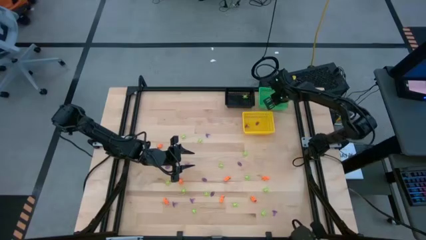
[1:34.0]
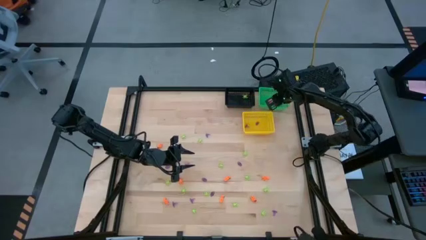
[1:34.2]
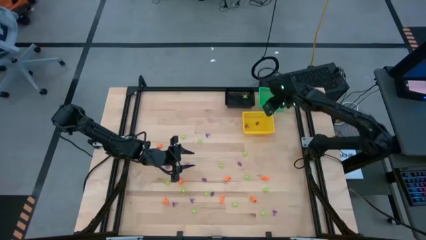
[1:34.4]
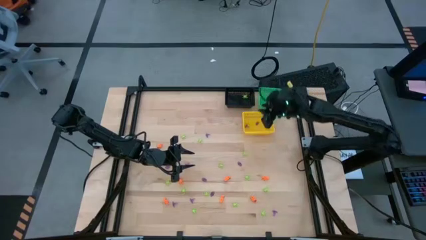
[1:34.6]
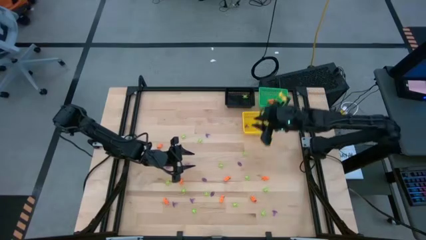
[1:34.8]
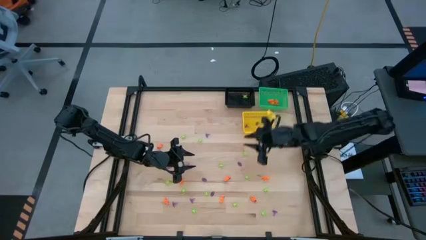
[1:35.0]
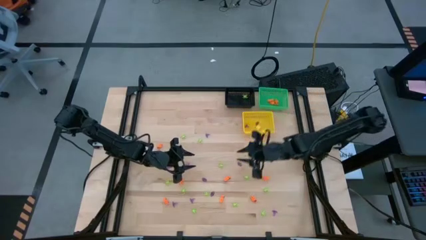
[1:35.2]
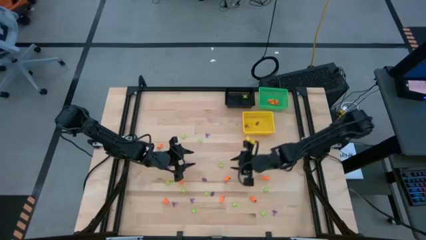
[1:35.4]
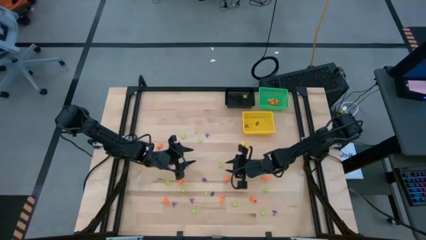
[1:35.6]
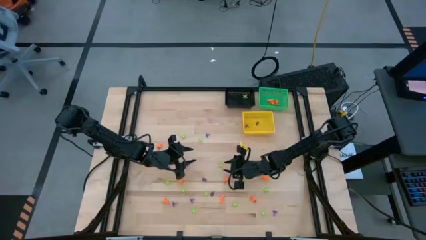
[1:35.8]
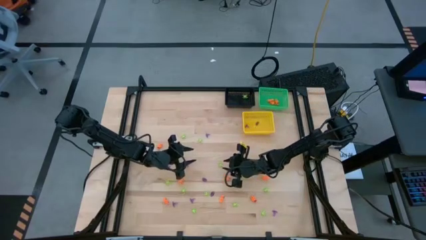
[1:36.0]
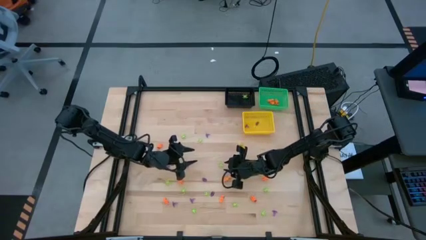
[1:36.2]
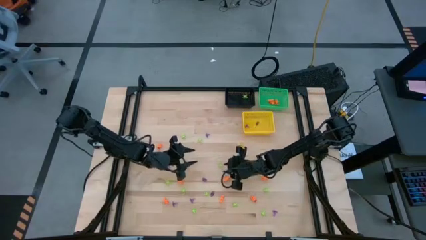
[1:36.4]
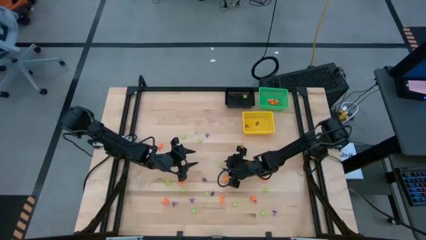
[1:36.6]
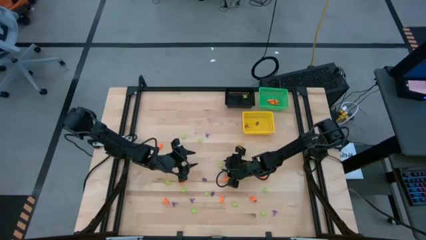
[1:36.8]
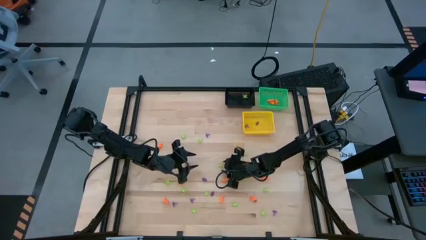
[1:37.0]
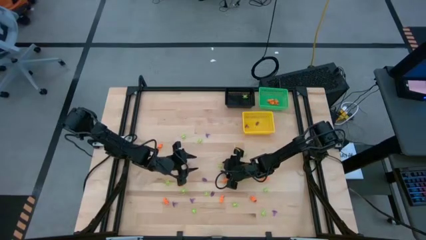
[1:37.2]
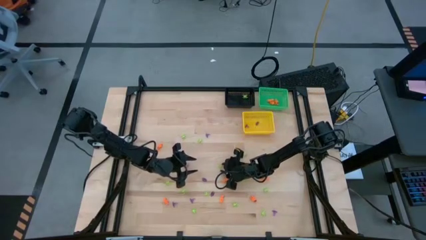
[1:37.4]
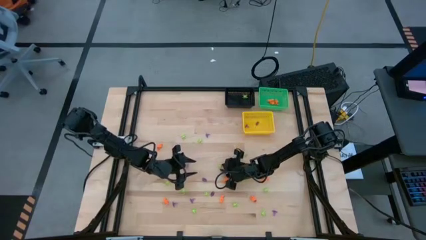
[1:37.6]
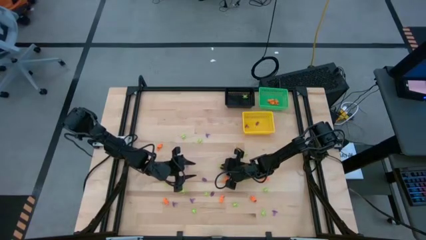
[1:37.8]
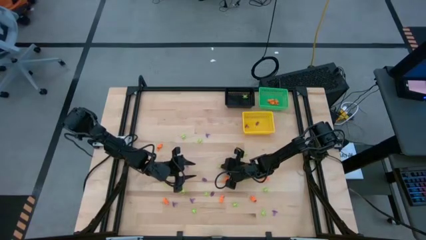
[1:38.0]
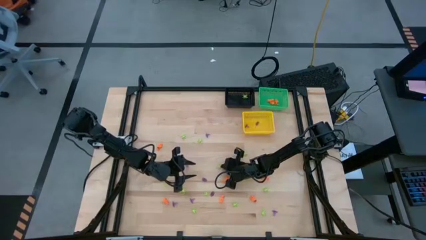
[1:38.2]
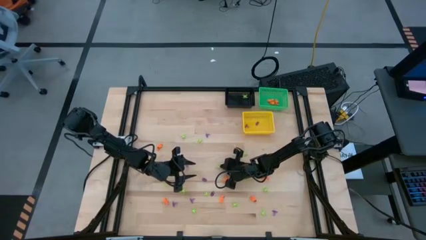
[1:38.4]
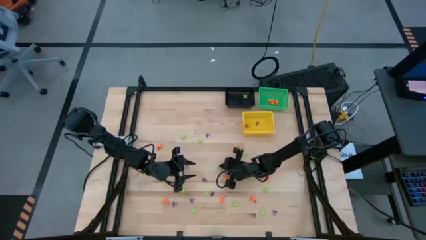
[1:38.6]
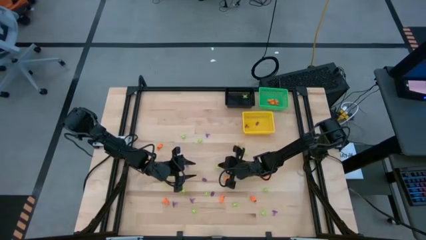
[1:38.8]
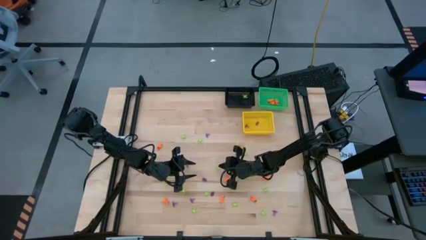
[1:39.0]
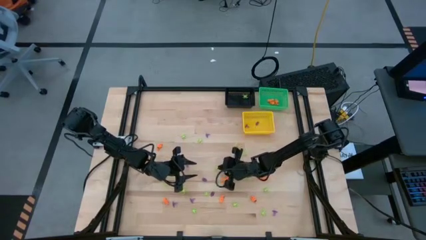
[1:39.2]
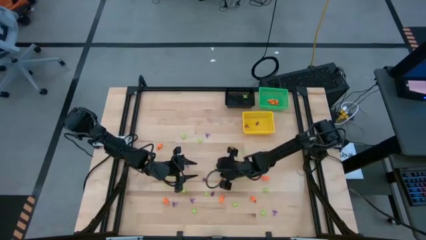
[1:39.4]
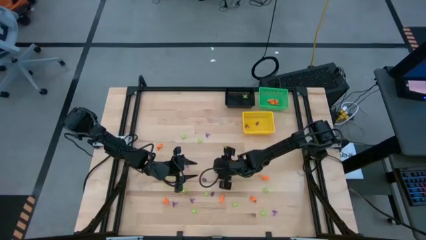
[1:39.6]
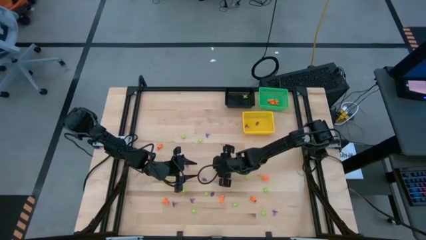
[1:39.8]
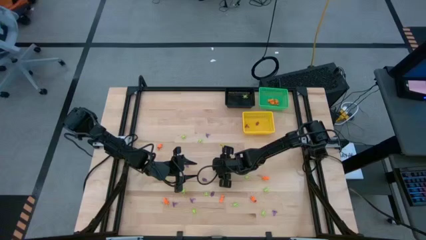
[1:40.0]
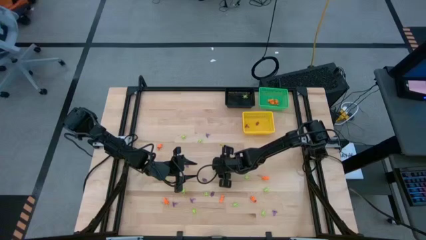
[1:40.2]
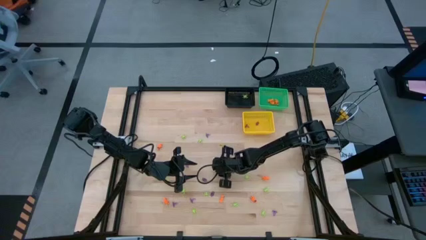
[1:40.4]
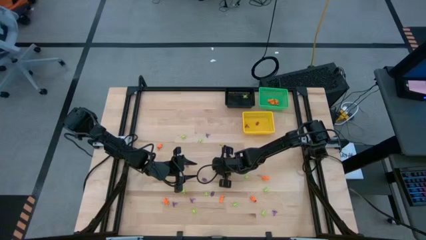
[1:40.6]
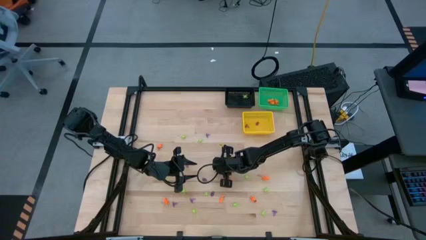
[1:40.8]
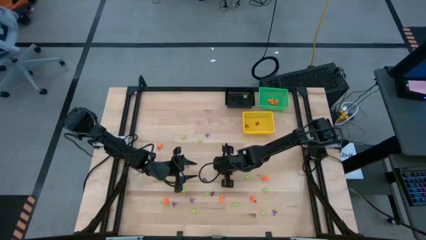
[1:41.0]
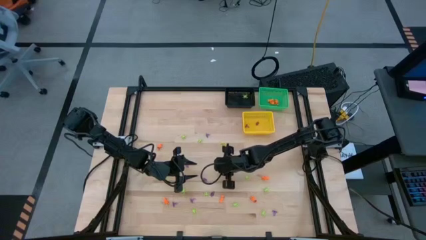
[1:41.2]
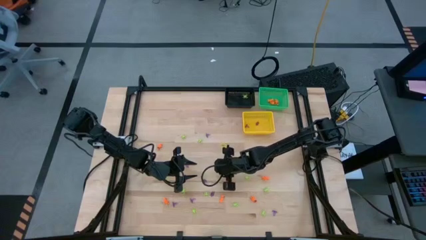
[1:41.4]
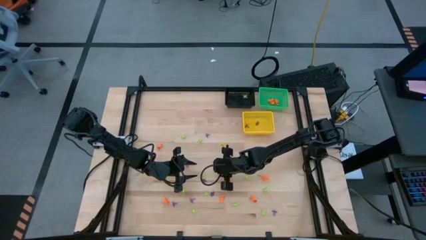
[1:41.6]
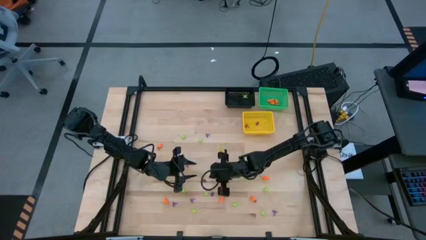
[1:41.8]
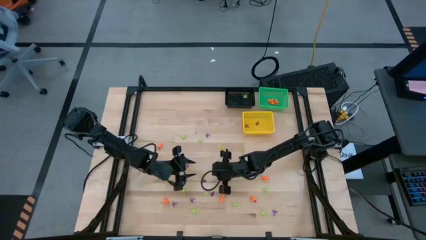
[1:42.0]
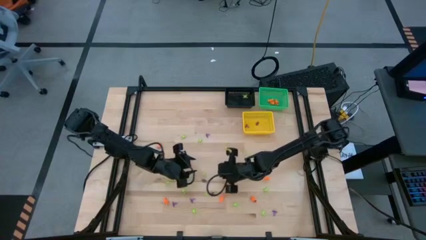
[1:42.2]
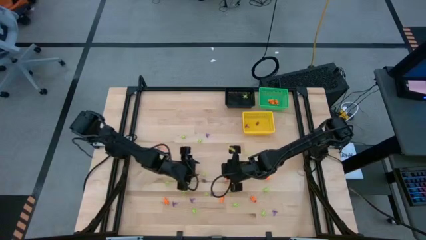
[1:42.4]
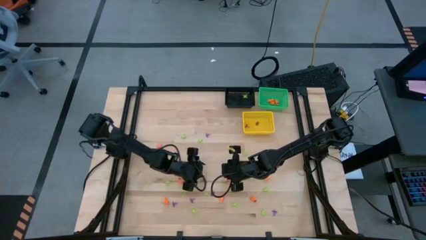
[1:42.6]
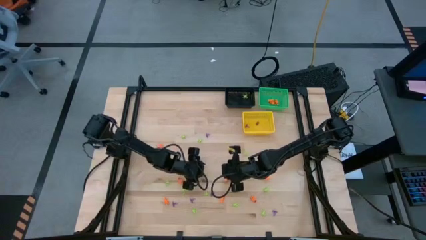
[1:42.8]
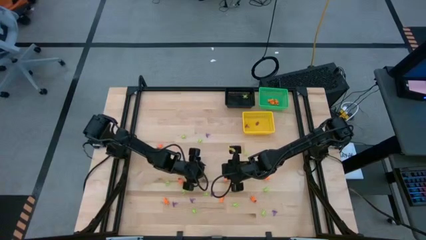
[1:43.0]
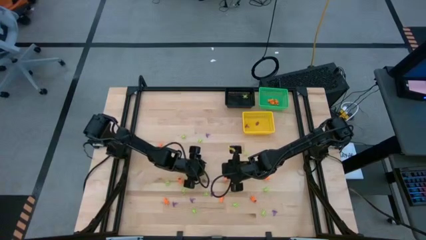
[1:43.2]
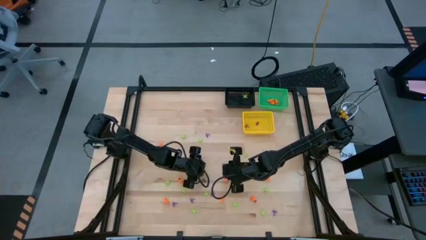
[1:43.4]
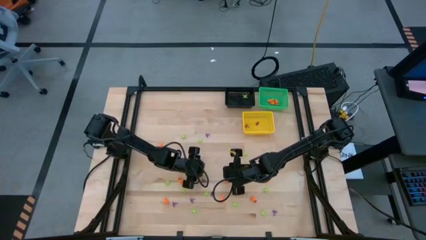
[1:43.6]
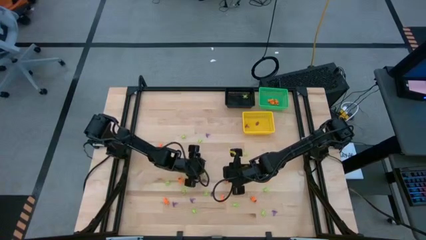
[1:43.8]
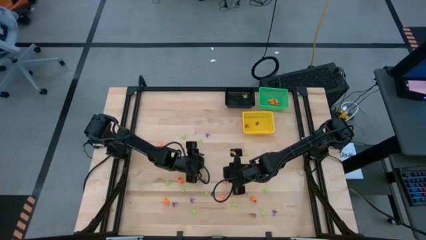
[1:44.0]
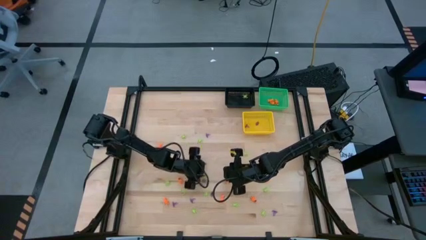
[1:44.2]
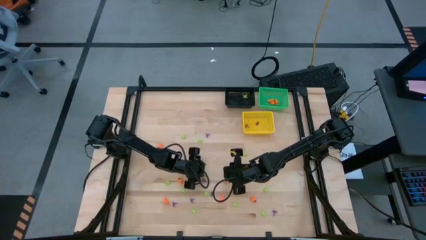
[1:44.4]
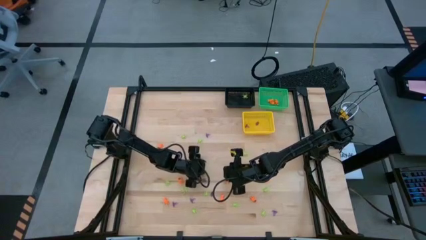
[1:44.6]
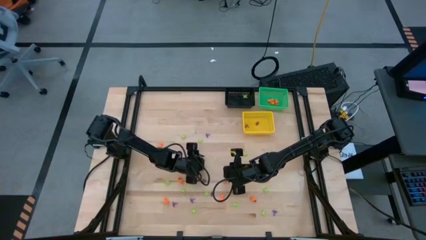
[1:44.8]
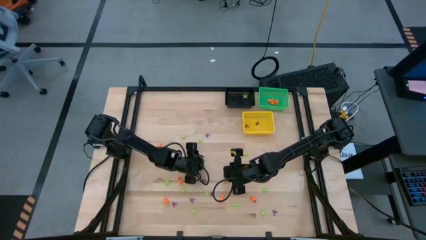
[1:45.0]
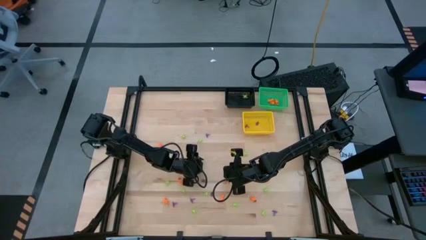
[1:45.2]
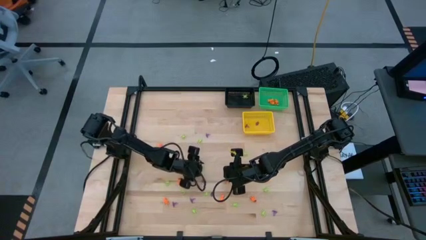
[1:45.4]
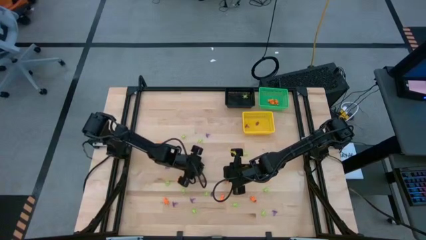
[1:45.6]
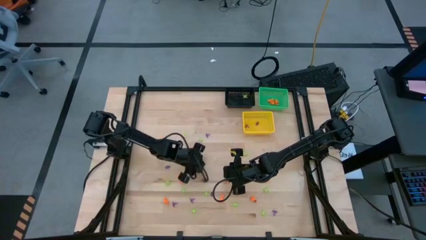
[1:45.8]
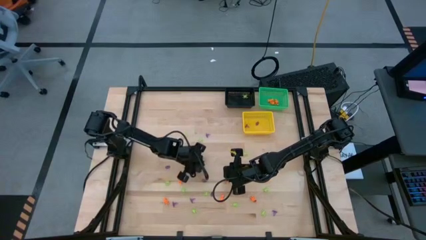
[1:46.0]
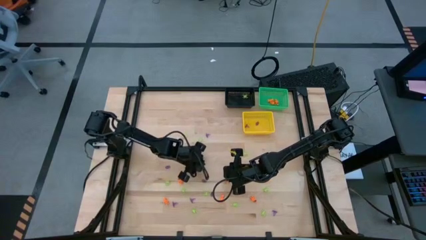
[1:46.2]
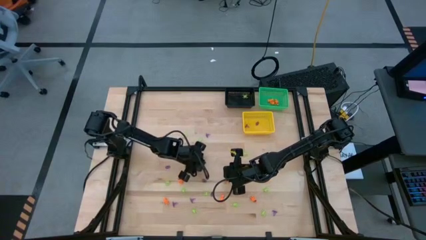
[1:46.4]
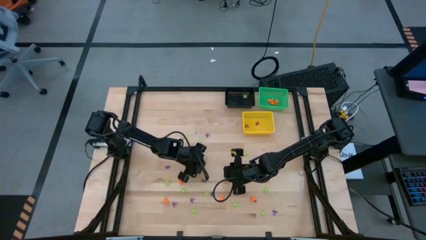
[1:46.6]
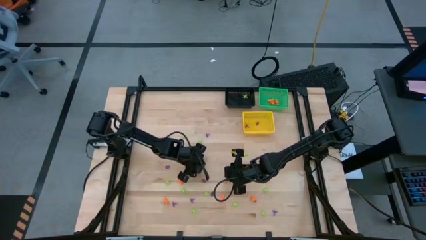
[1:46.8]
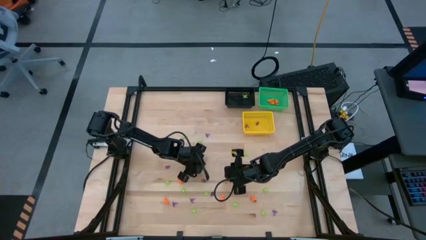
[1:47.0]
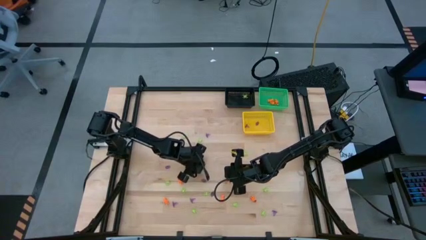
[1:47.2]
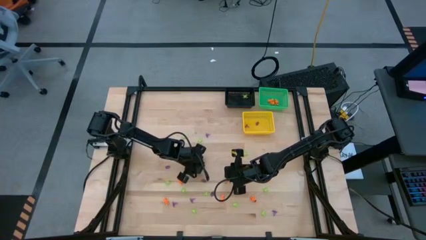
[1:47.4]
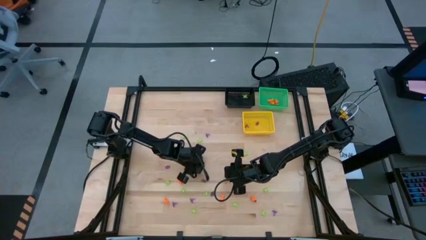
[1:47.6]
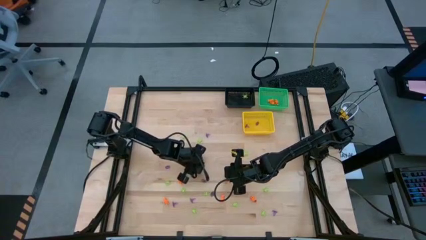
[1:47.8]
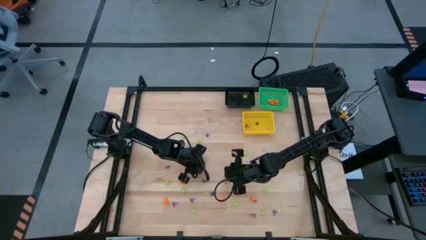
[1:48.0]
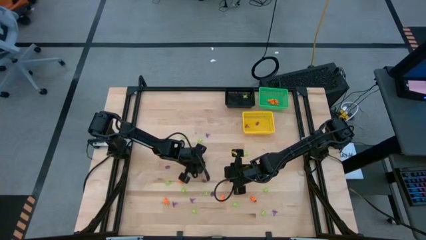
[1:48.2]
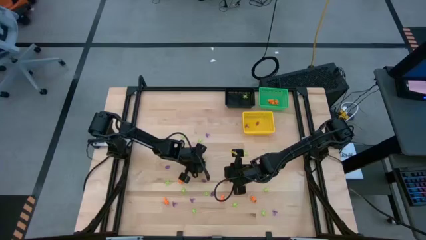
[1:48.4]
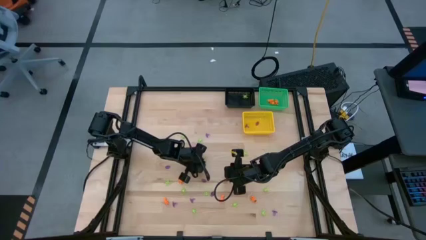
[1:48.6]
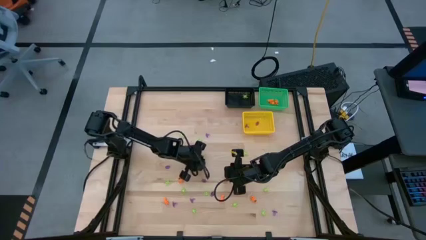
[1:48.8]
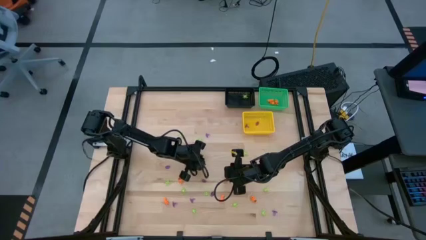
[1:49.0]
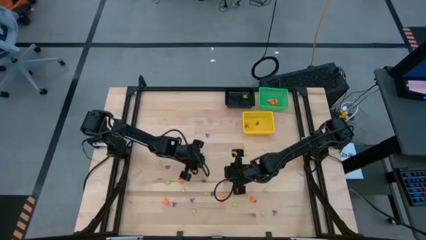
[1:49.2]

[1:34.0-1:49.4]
Task: Sort Halloween decoration
Put the green spider toy into the black basket

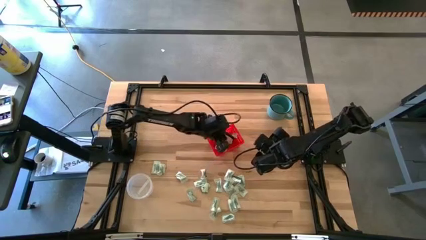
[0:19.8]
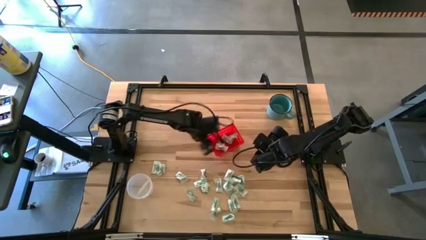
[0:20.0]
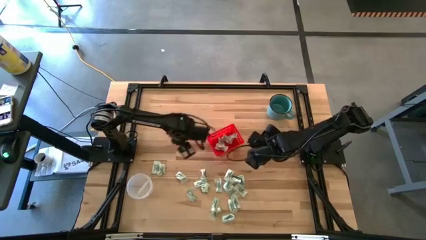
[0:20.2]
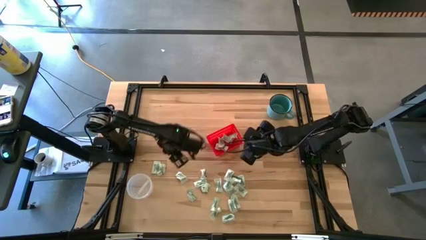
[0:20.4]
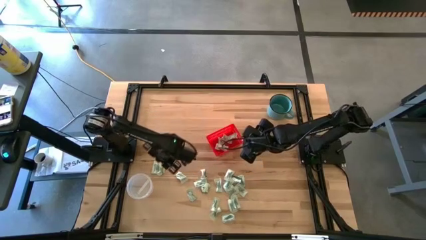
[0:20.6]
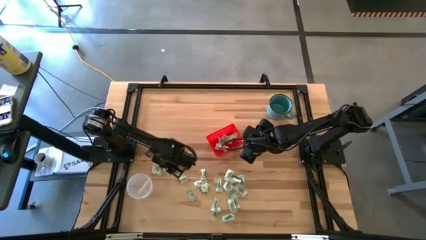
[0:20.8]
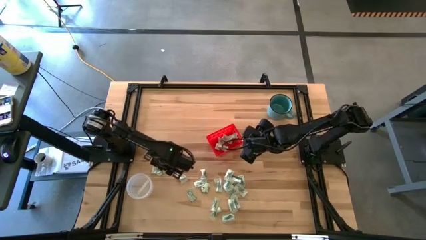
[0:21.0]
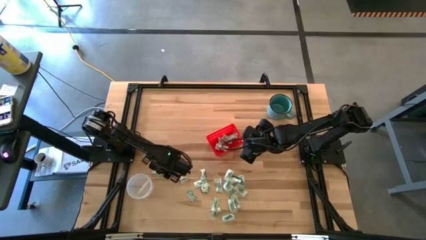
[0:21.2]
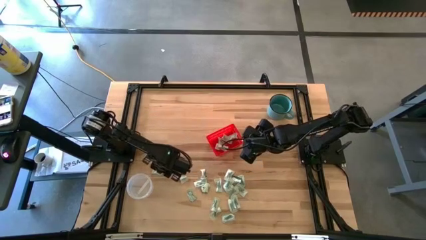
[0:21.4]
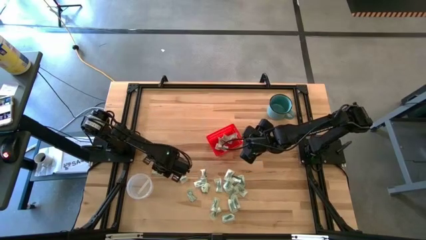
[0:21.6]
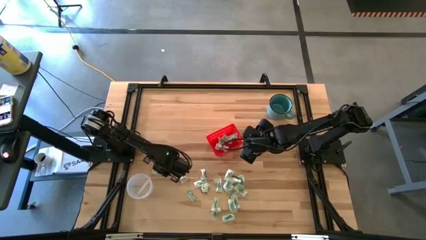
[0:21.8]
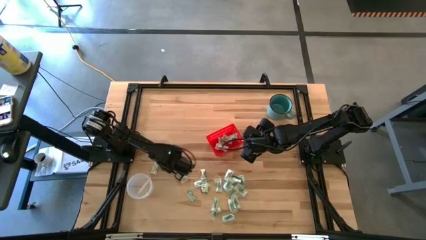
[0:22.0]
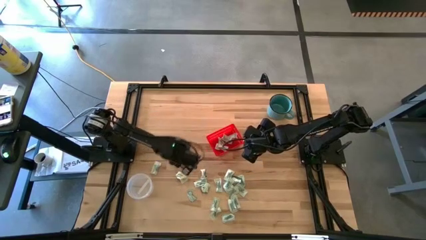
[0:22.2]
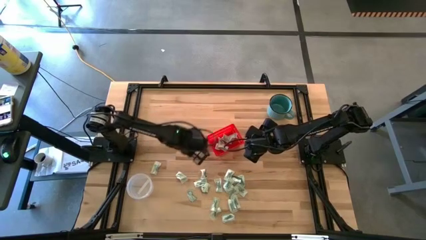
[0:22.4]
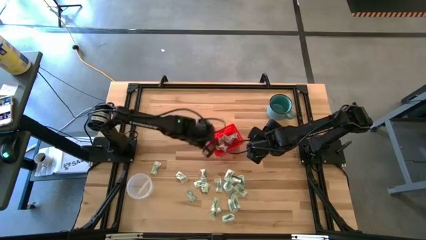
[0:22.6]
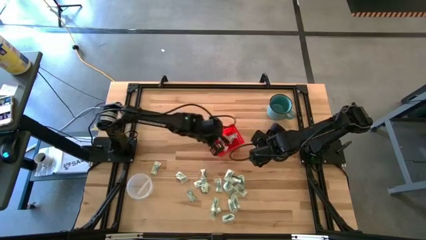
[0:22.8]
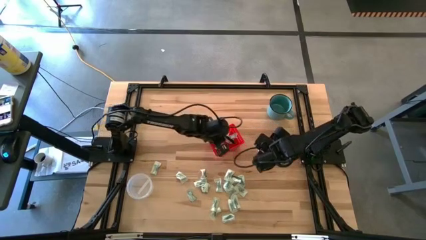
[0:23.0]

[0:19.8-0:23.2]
Task: Pick and place items into bin
Put the stevia packet into the red bin
